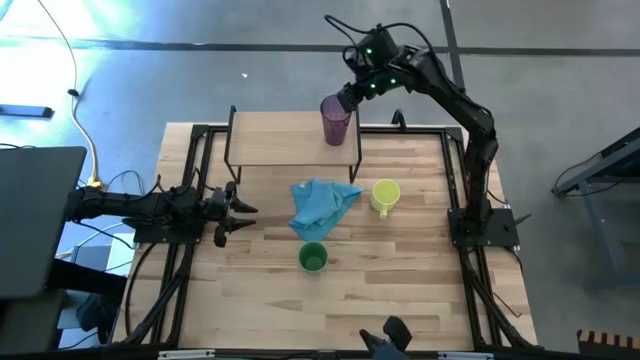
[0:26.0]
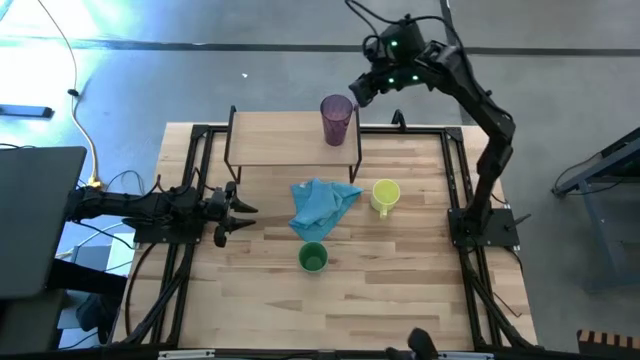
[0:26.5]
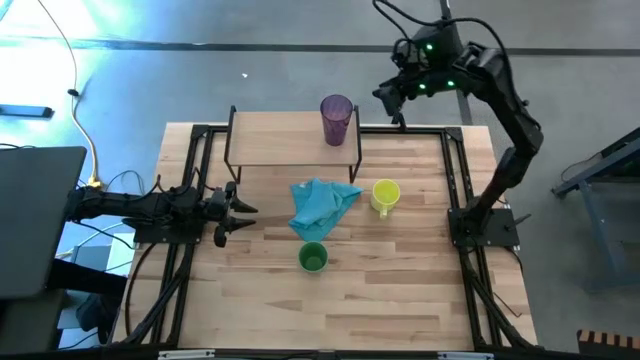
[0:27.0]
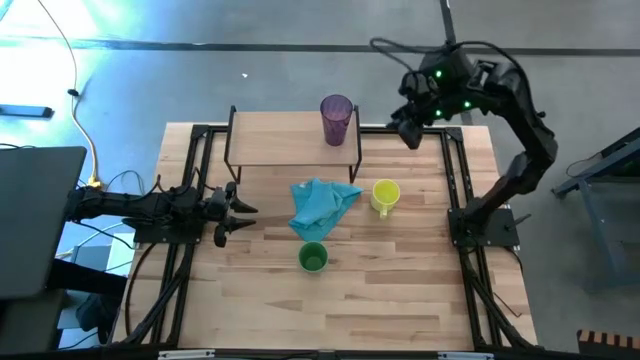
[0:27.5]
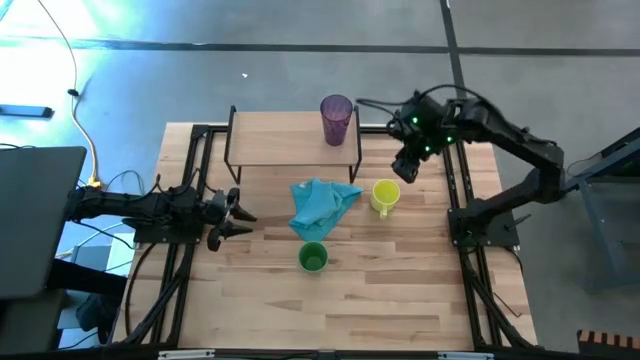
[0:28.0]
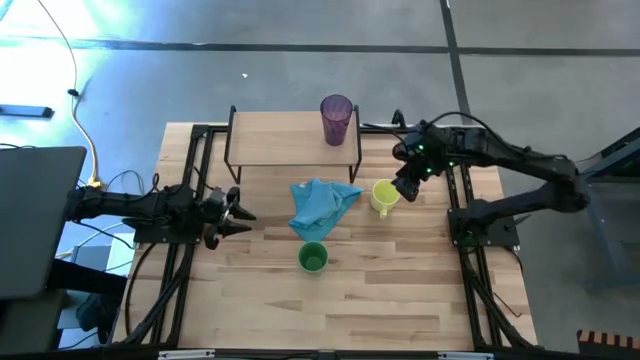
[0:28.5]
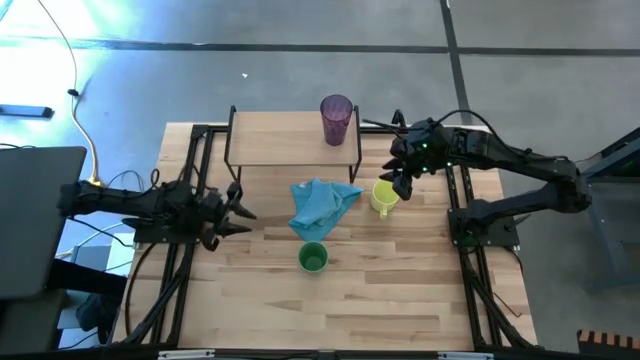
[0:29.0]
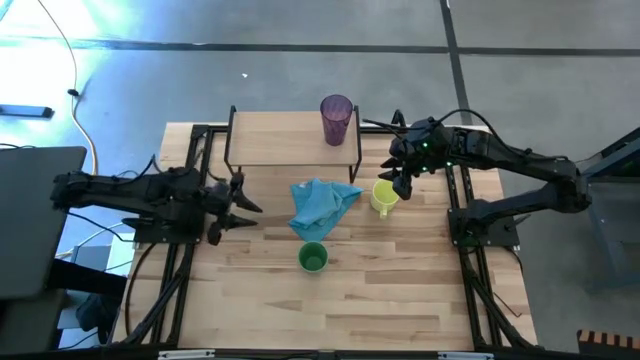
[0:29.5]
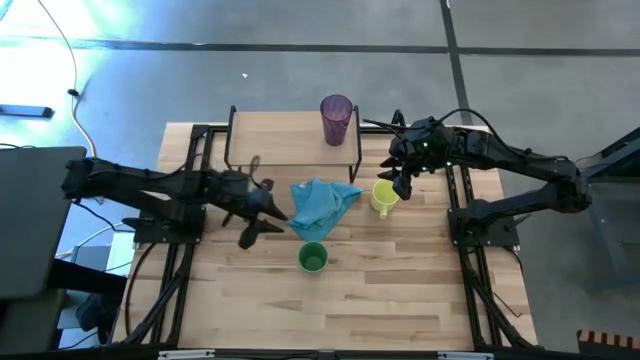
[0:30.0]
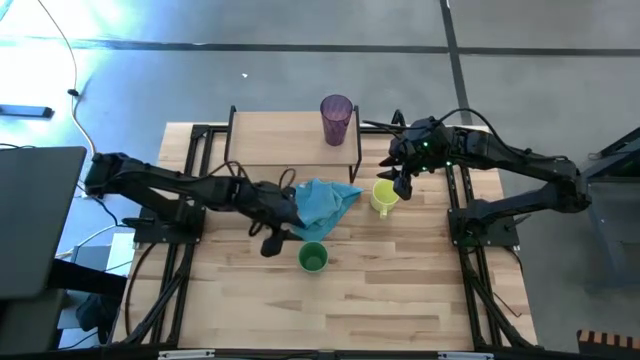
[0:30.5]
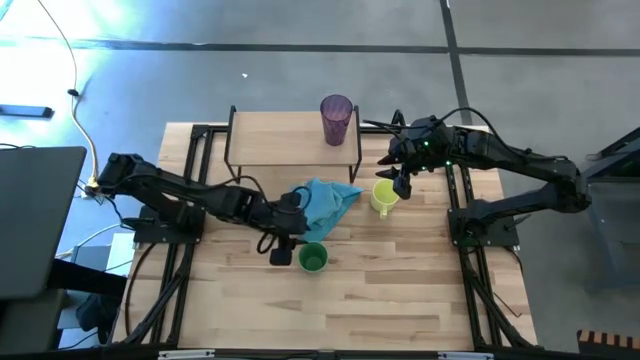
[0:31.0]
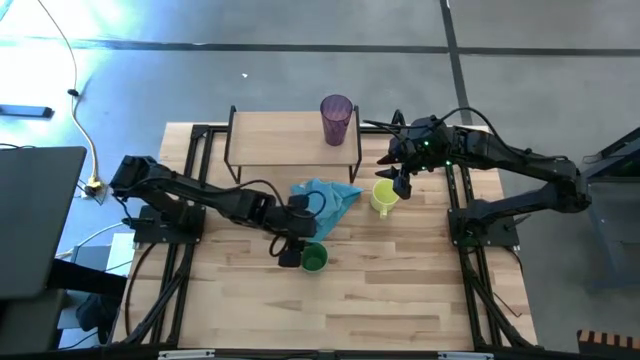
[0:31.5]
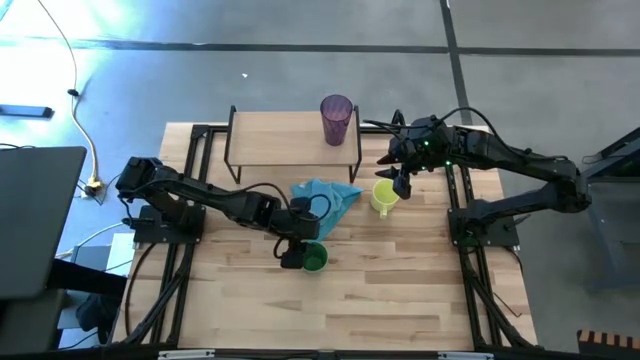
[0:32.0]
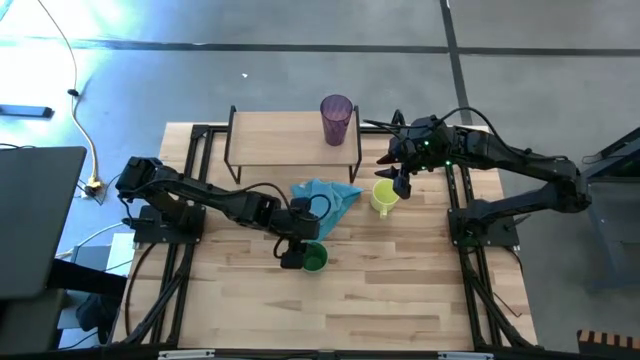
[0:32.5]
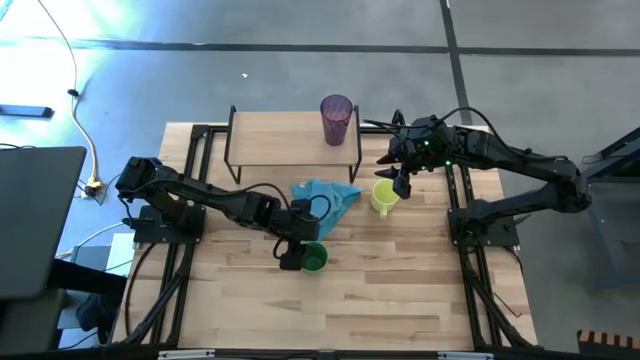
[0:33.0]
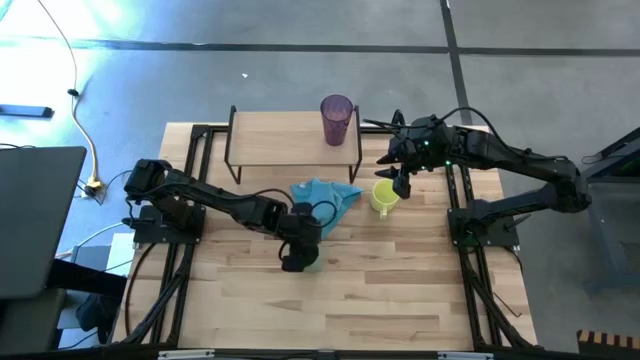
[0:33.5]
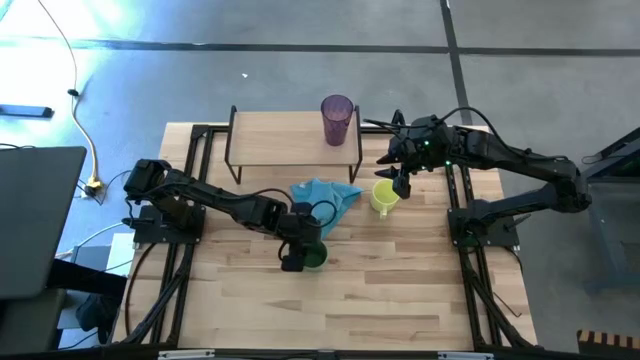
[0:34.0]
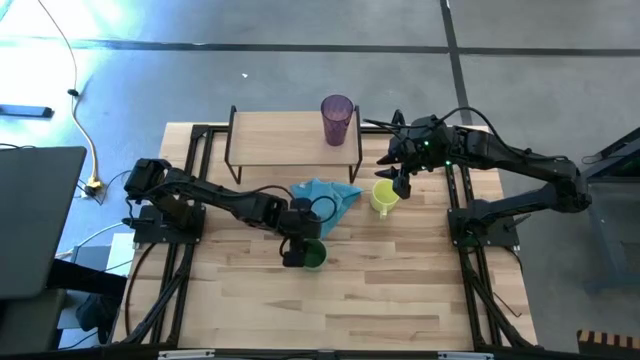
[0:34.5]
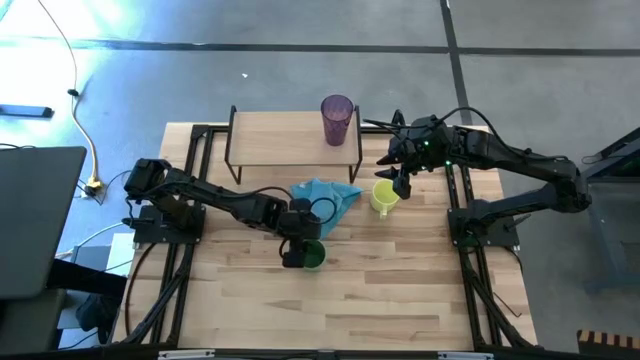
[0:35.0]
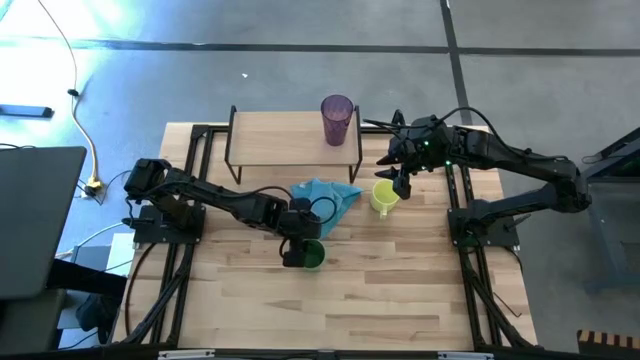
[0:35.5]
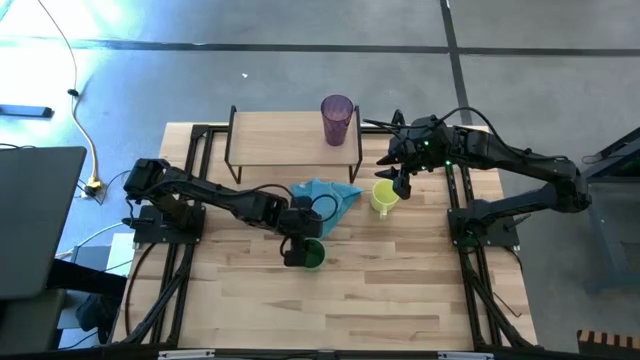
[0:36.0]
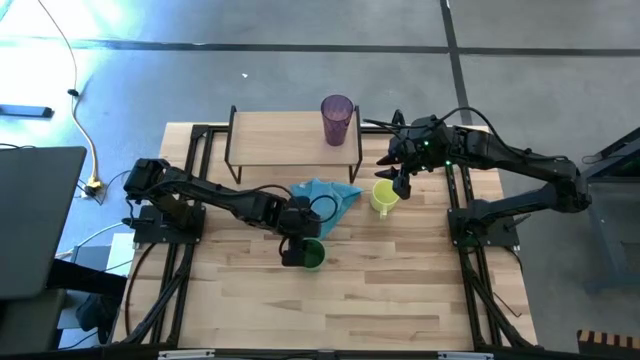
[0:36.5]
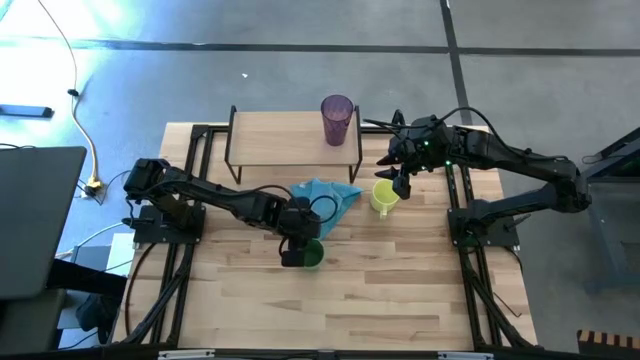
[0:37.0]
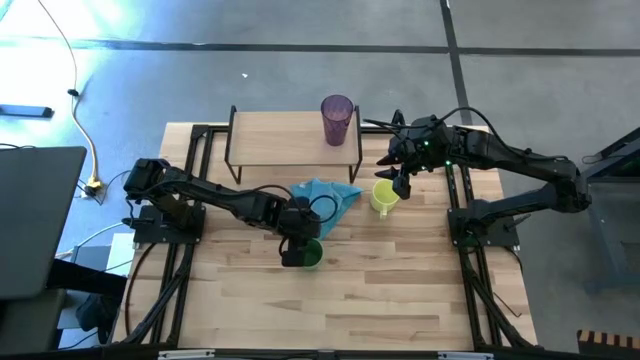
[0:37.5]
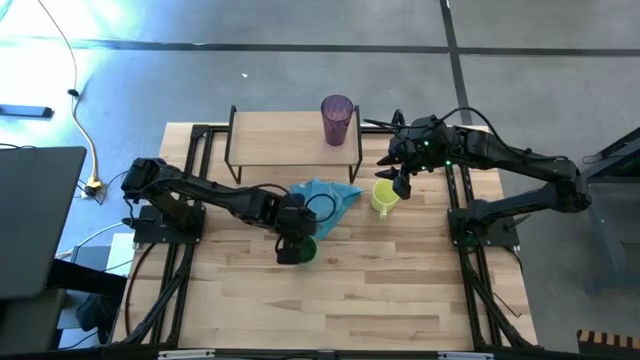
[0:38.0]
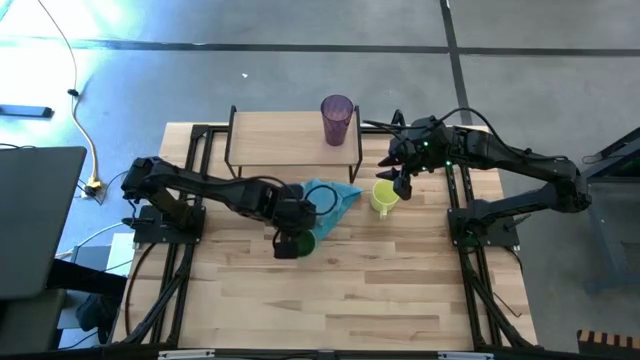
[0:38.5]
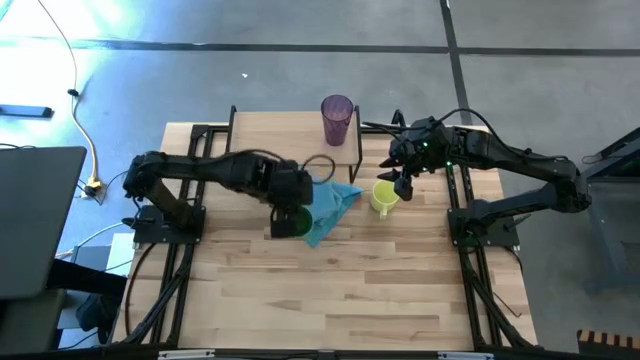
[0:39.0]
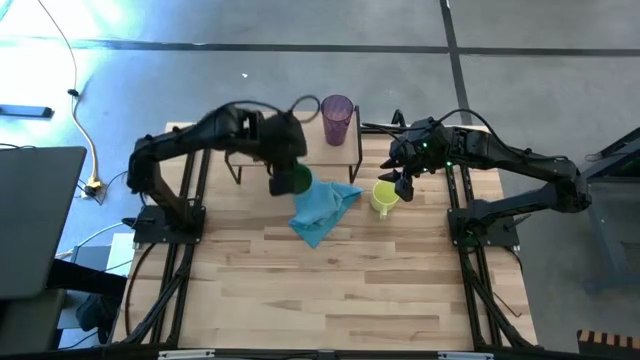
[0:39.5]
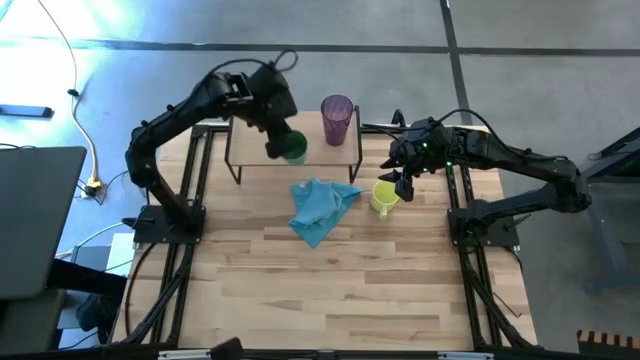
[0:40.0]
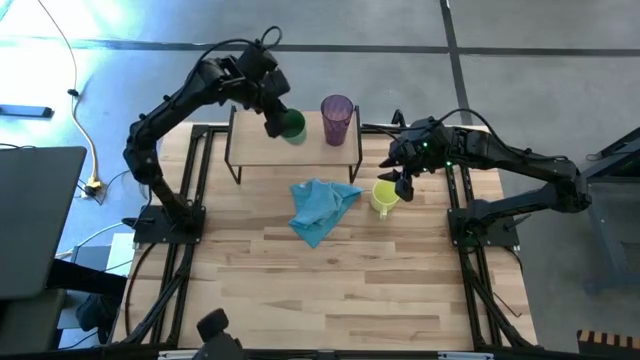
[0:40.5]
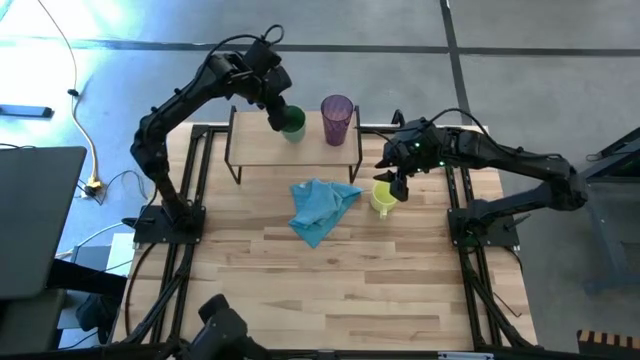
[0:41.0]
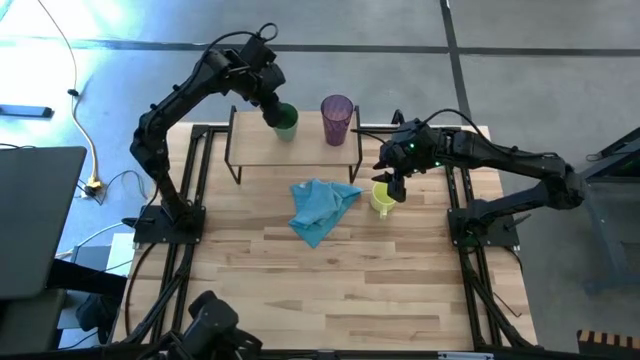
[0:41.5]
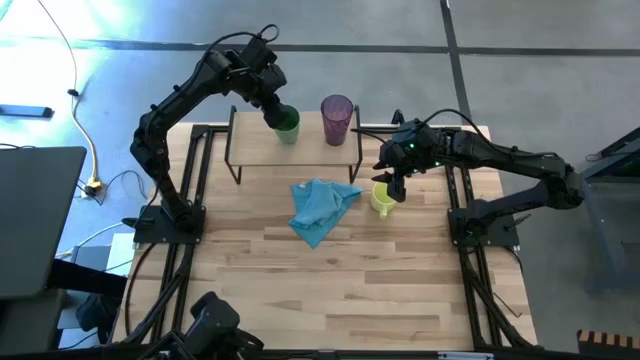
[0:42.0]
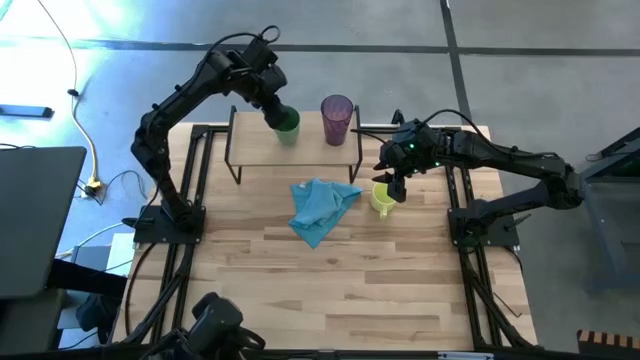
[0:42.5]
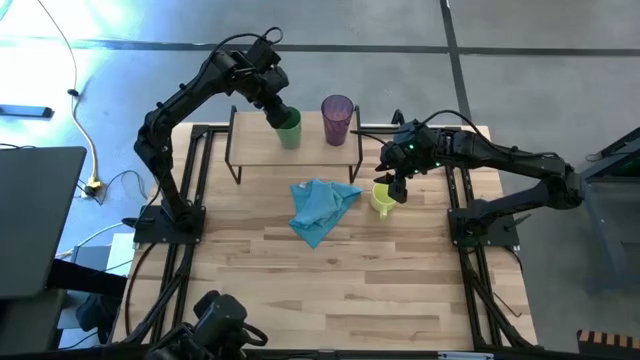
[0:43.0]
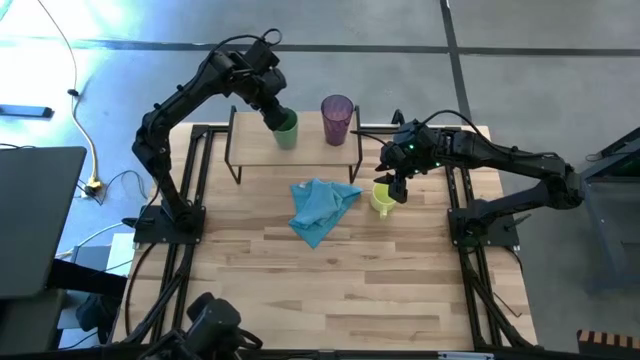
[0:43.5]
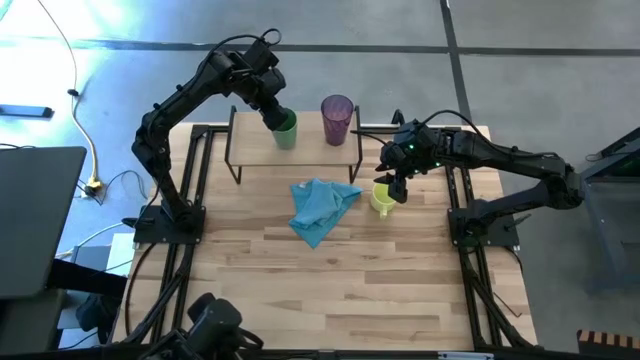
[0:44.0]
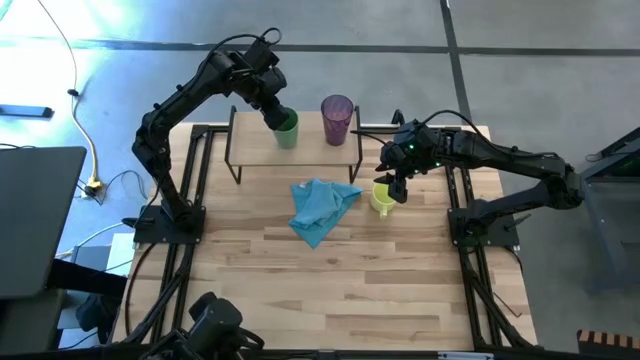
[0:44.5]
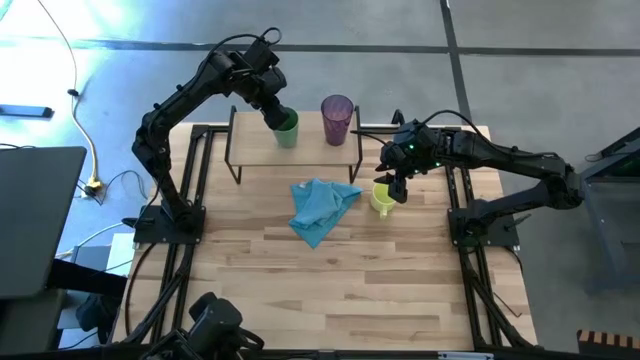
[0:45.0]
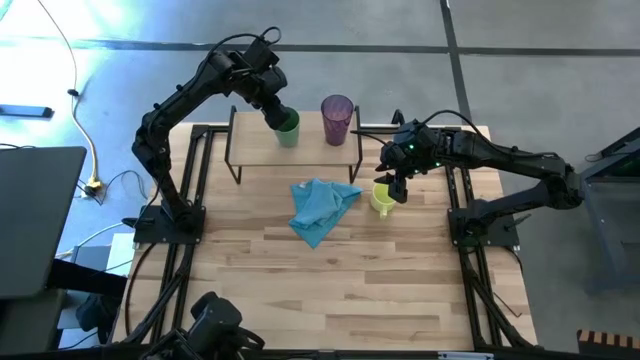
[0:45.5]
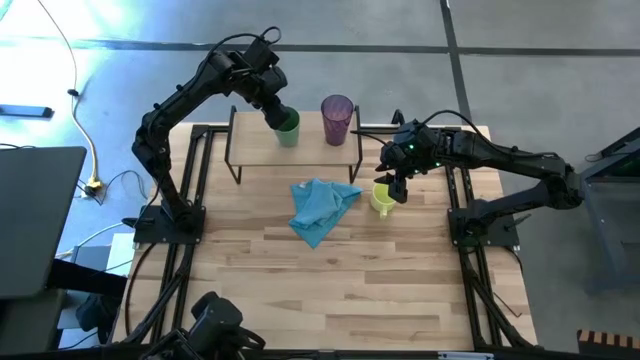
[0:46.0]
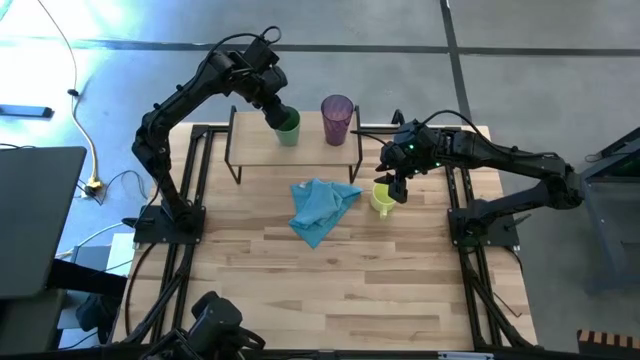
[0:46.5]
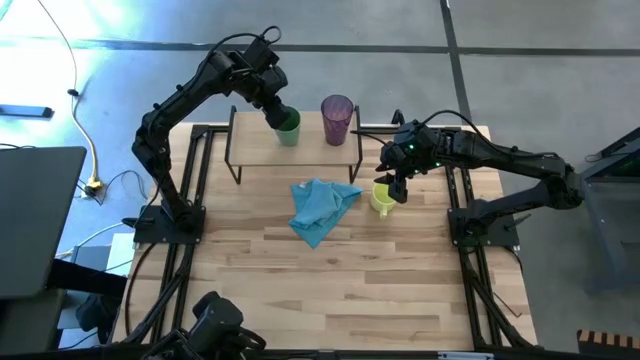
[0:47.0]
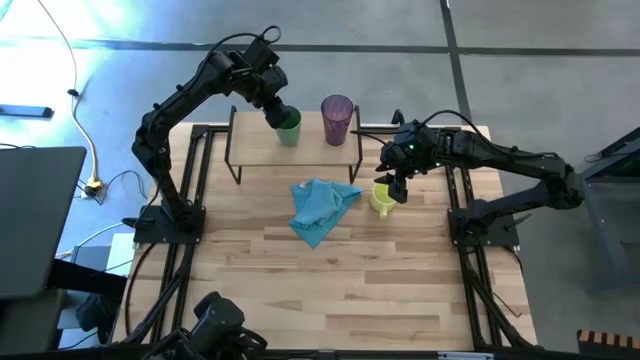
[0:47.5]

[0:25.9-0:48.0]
Task: Stack small to large cups/mugs on shelf
Put the green cup on the shelf
